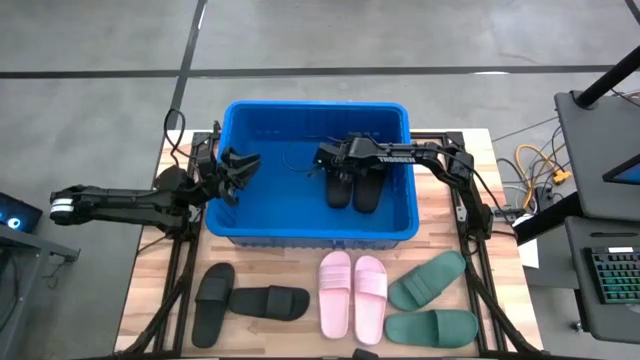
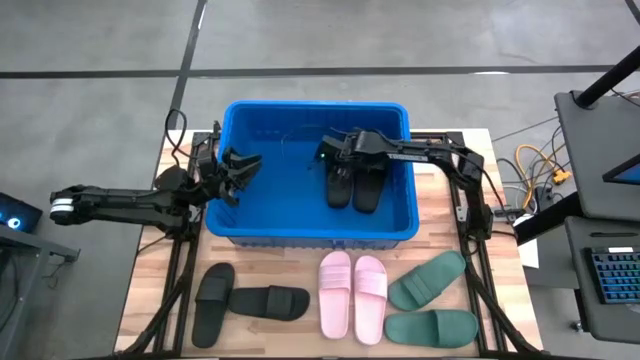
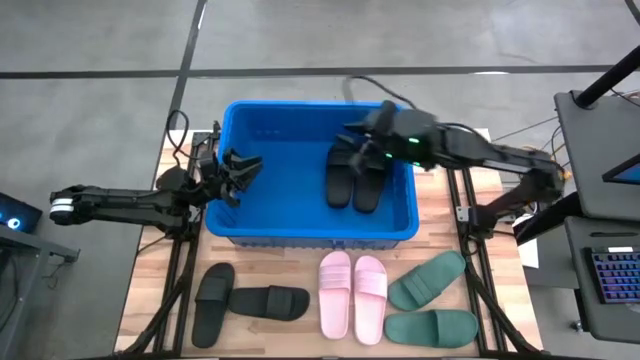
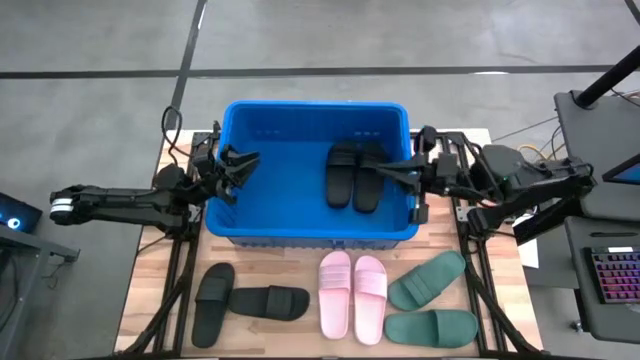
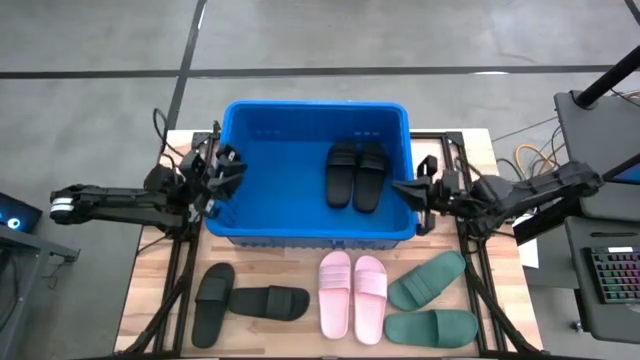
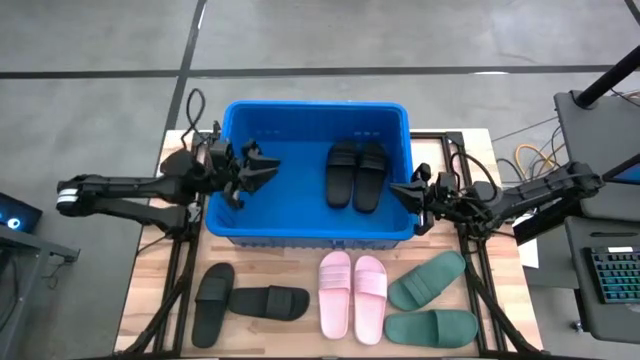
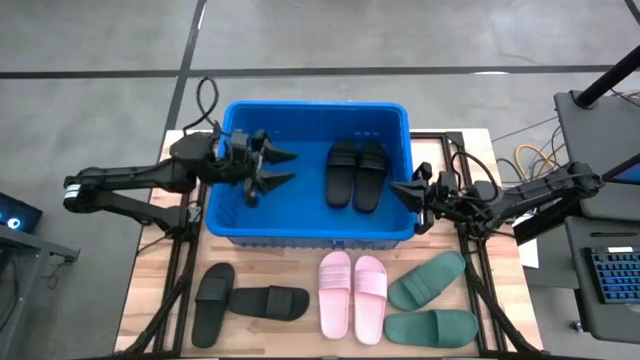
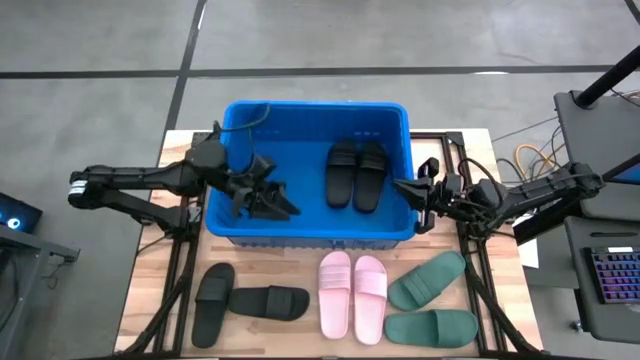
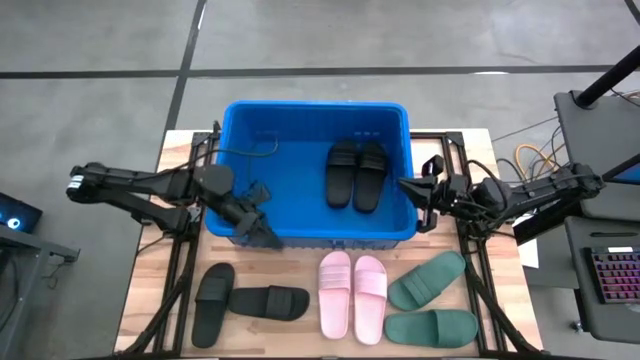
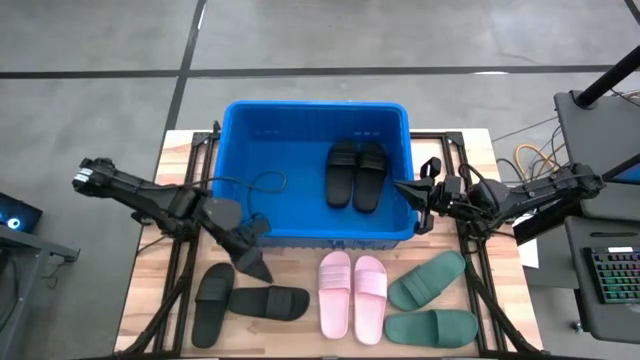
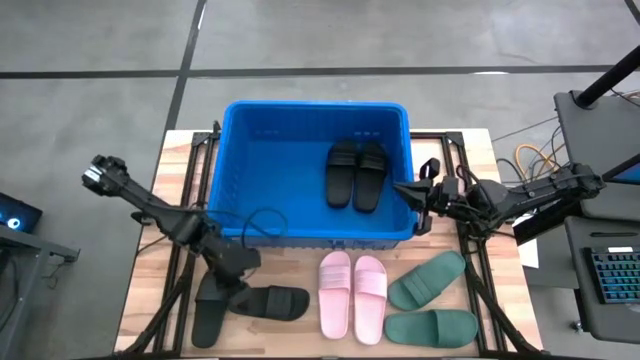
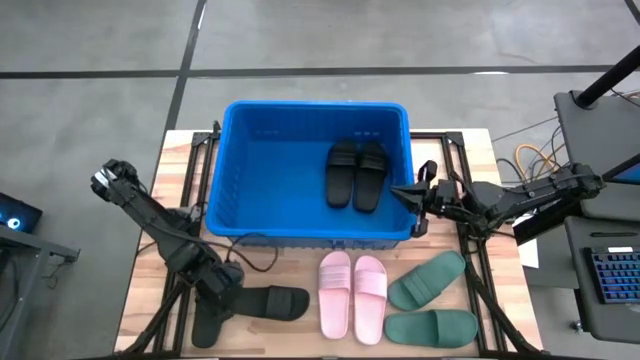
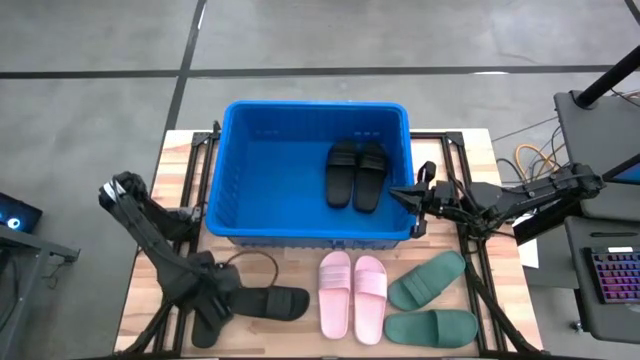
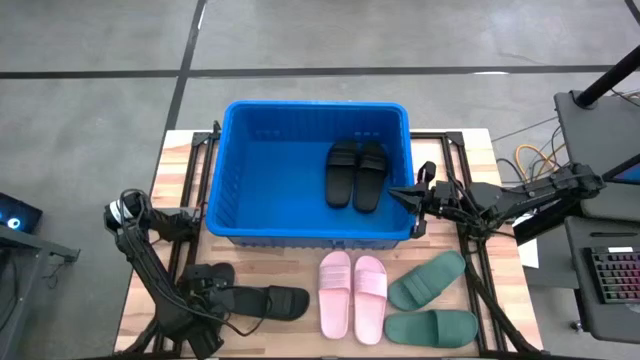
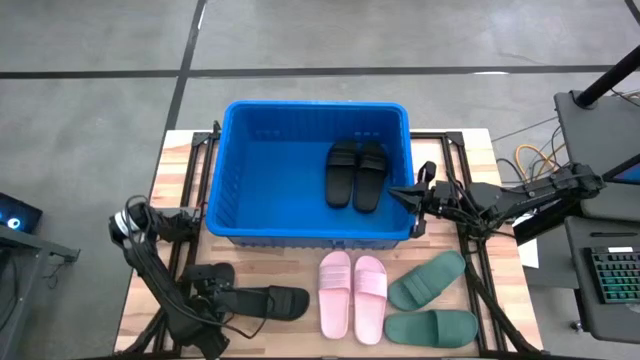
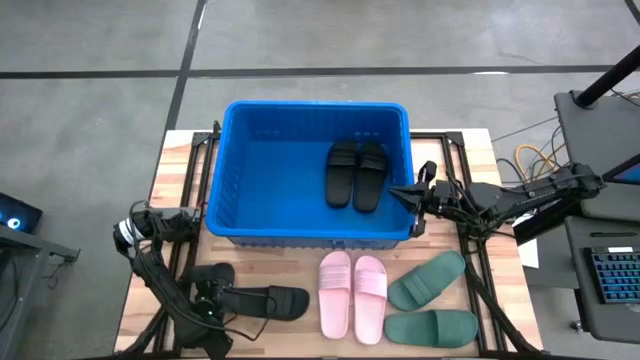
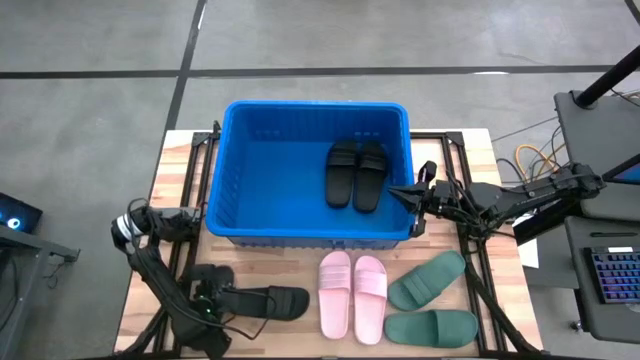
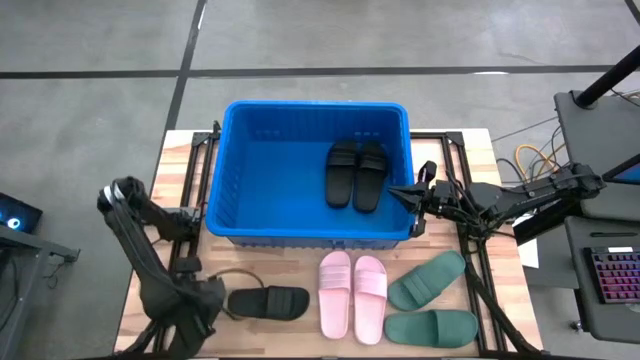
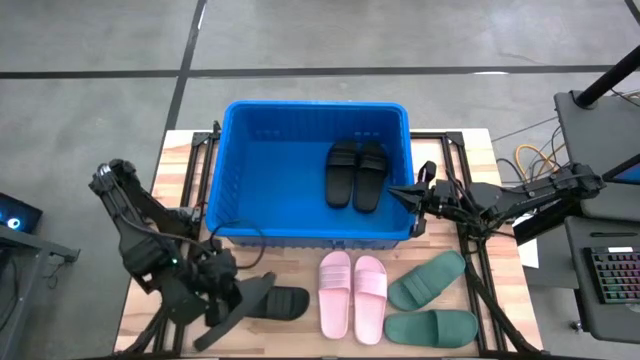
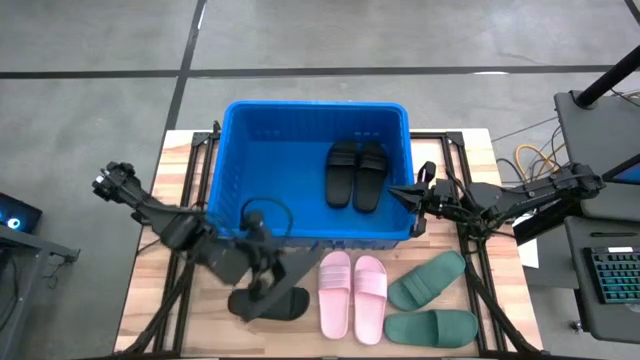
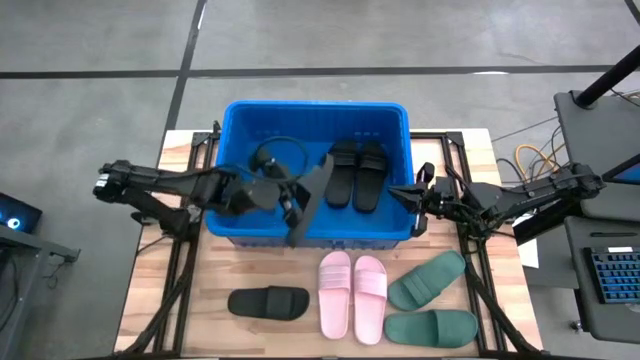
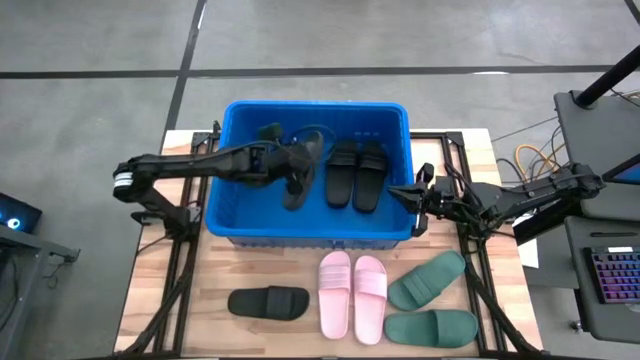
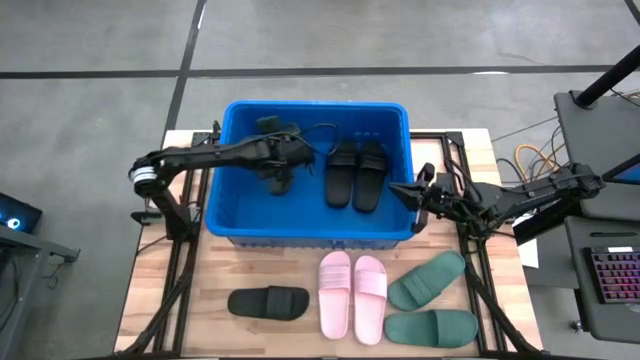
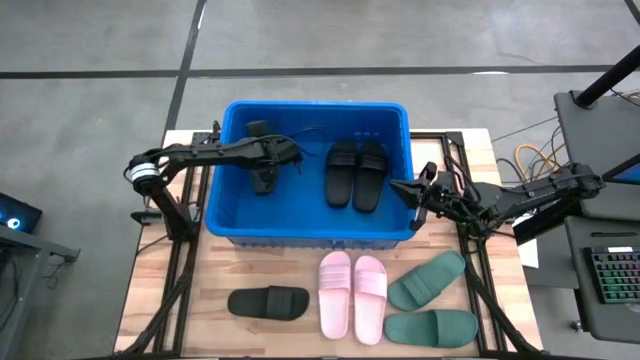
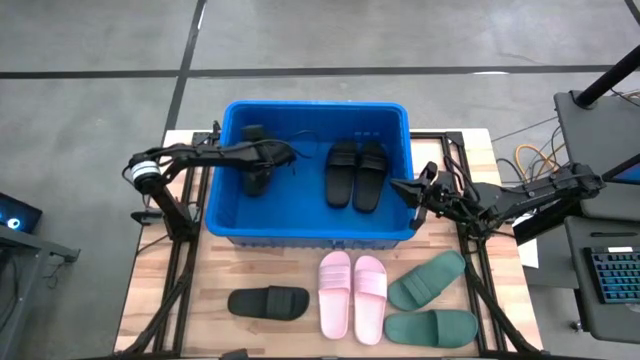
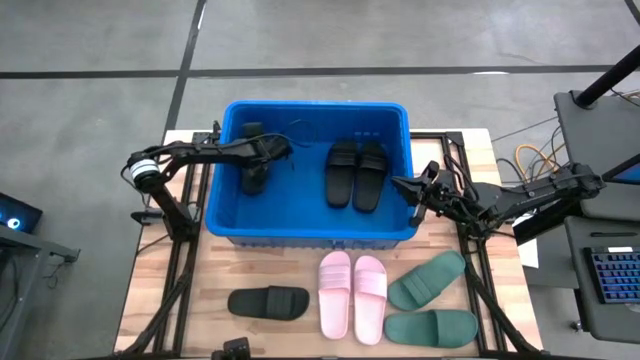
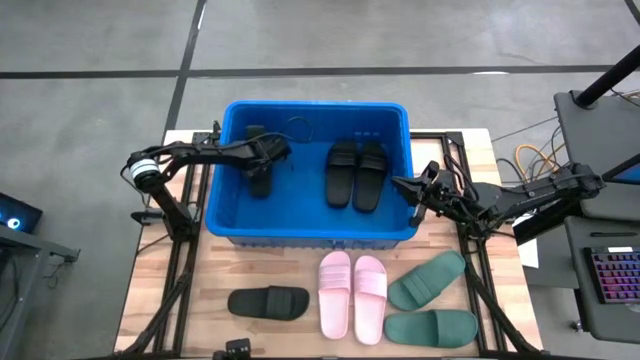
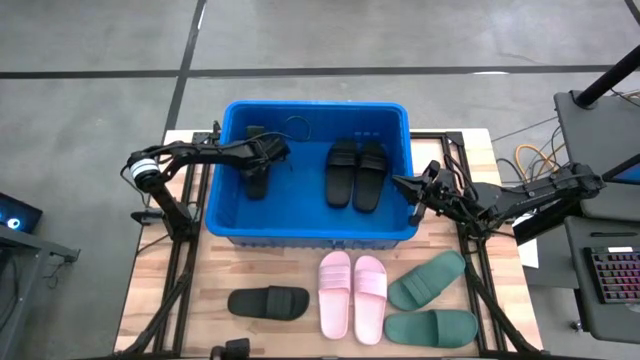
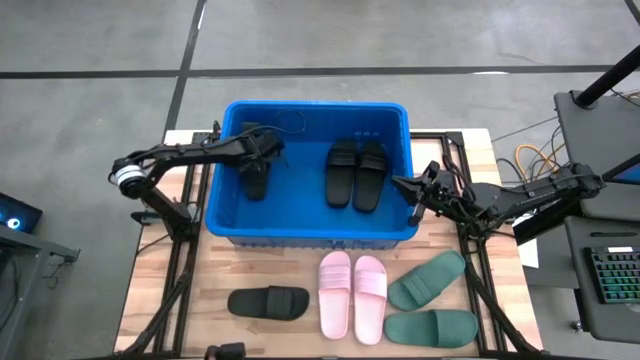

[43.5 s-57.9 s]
Task: Pick and place slides into bin
Put the left black slide into the blue bin
